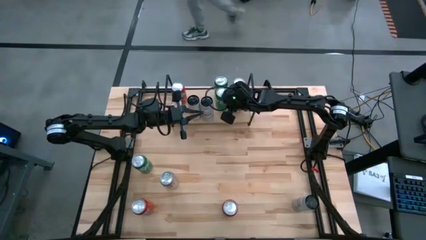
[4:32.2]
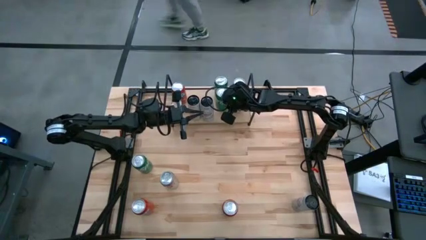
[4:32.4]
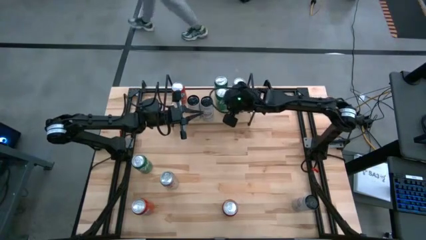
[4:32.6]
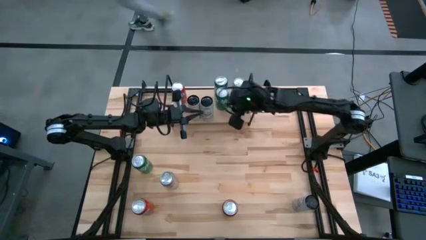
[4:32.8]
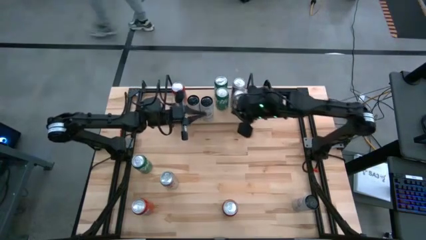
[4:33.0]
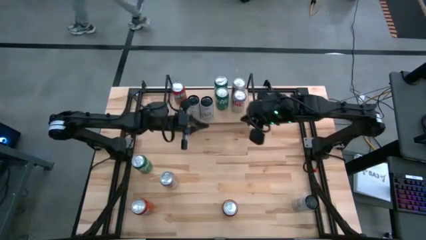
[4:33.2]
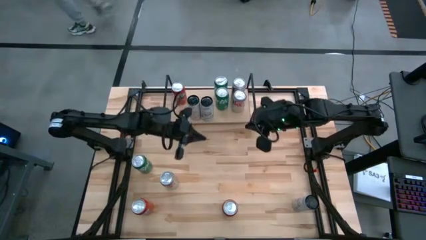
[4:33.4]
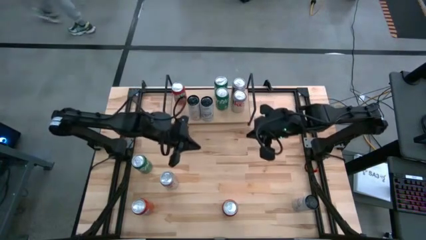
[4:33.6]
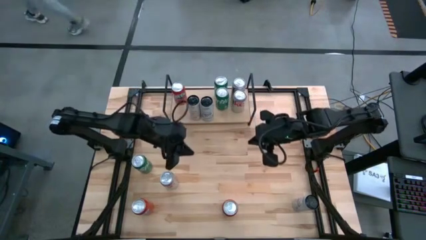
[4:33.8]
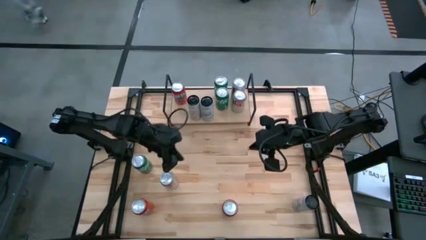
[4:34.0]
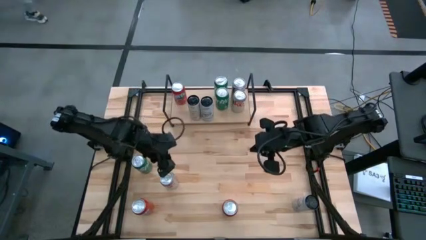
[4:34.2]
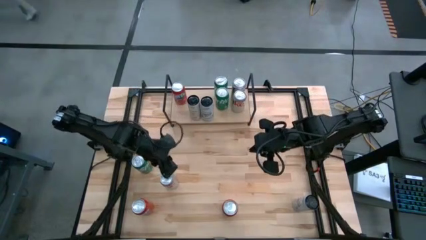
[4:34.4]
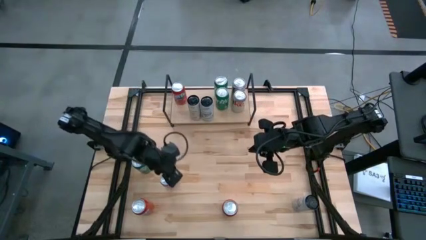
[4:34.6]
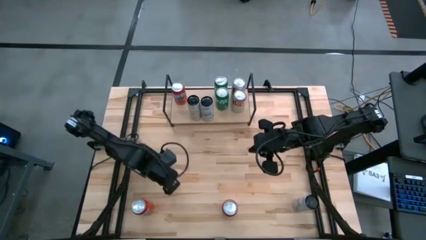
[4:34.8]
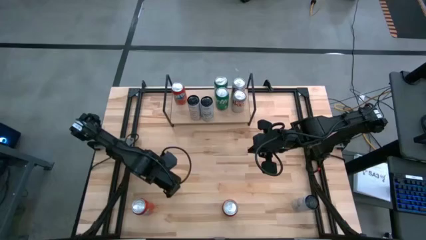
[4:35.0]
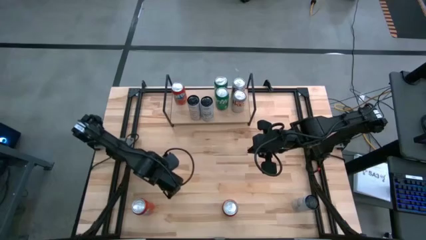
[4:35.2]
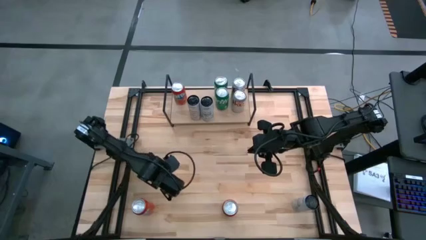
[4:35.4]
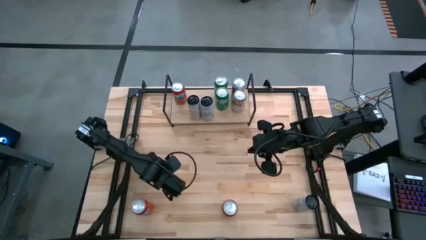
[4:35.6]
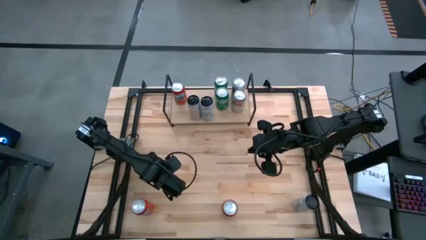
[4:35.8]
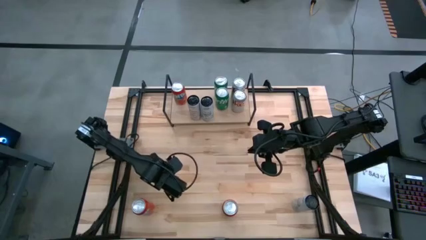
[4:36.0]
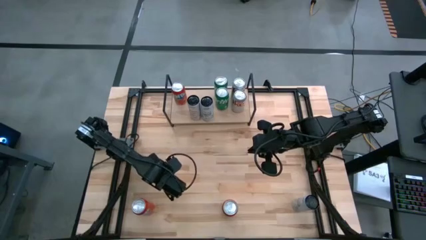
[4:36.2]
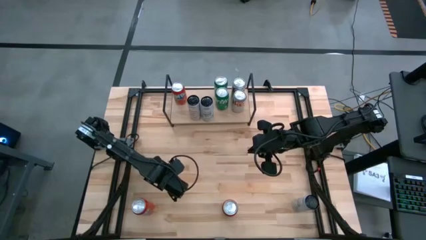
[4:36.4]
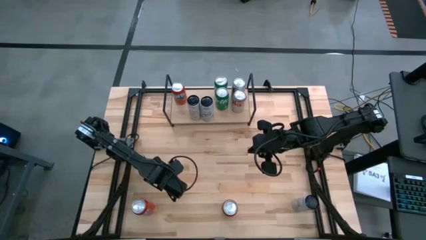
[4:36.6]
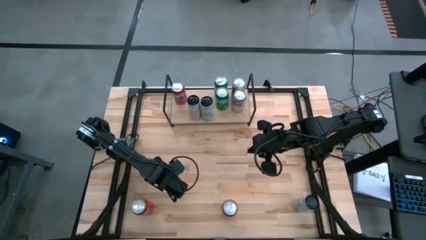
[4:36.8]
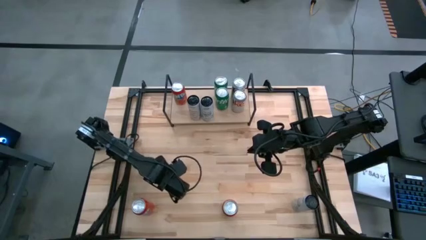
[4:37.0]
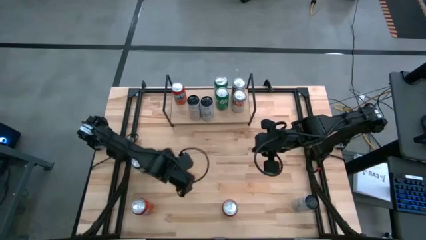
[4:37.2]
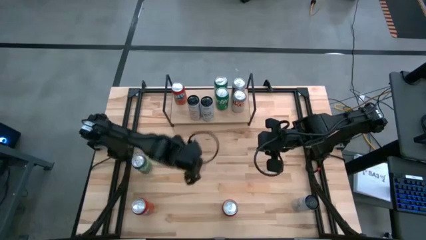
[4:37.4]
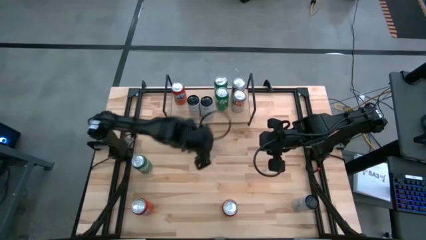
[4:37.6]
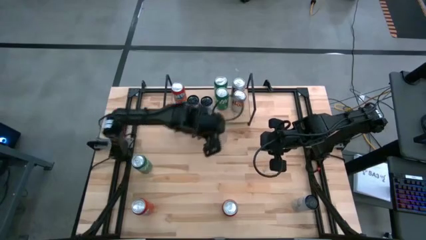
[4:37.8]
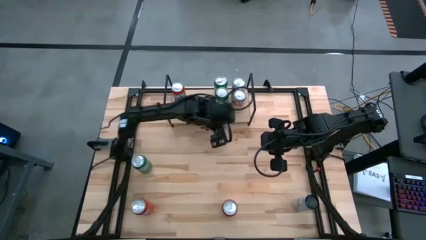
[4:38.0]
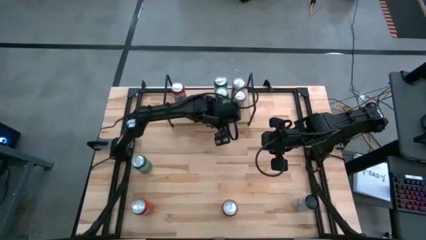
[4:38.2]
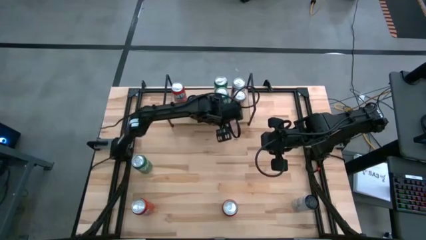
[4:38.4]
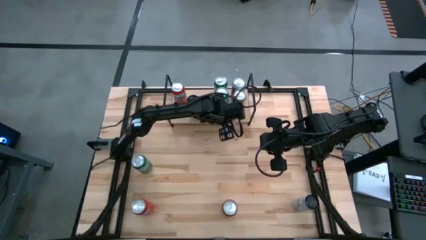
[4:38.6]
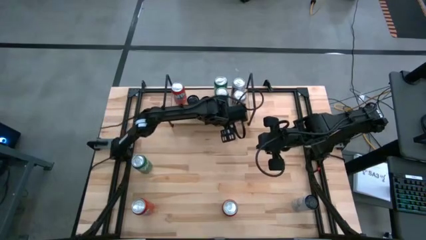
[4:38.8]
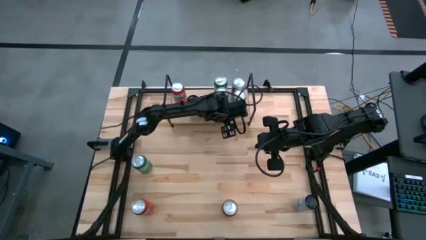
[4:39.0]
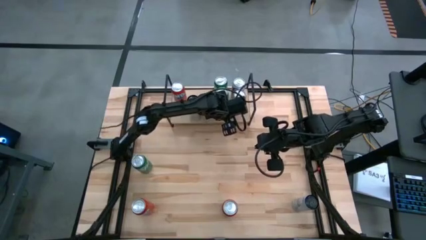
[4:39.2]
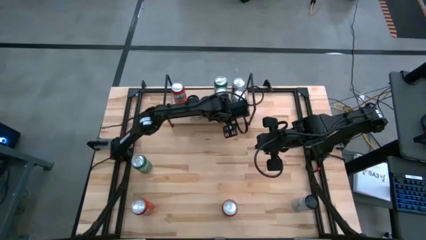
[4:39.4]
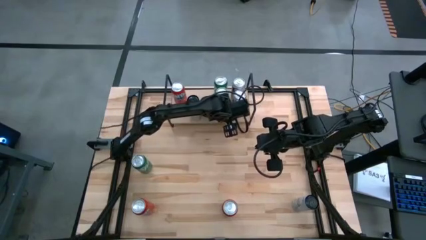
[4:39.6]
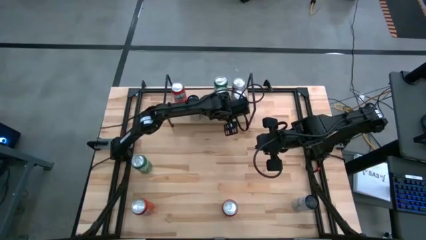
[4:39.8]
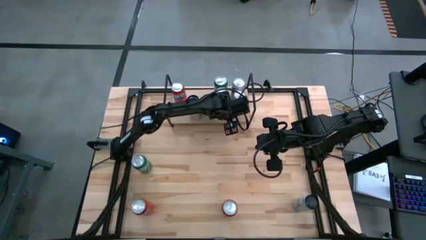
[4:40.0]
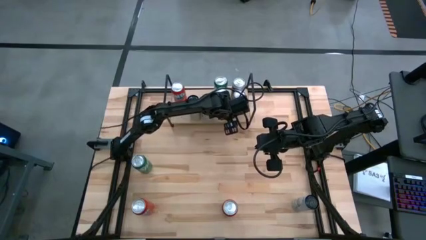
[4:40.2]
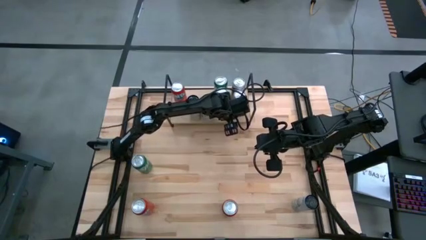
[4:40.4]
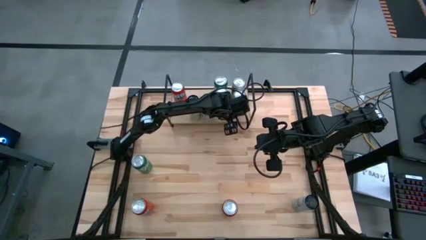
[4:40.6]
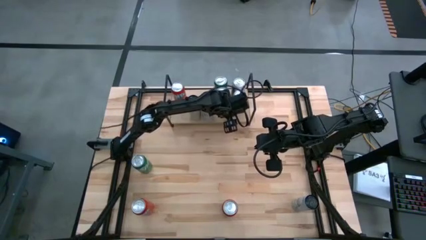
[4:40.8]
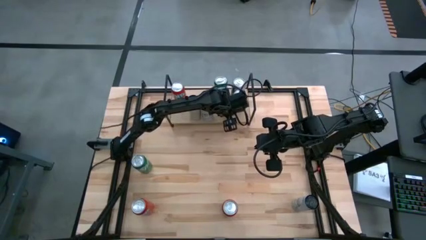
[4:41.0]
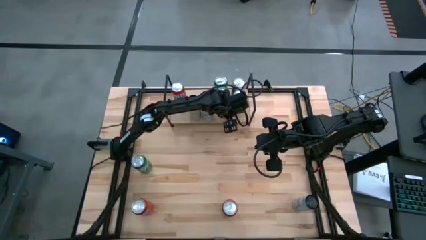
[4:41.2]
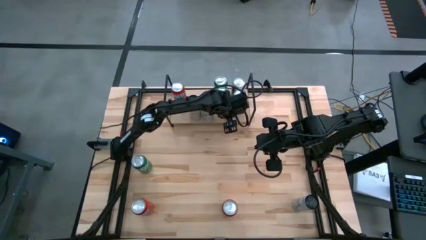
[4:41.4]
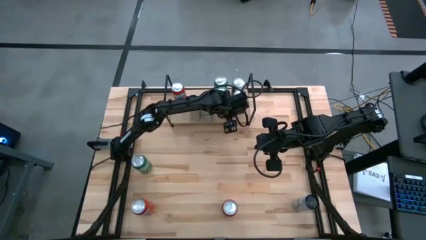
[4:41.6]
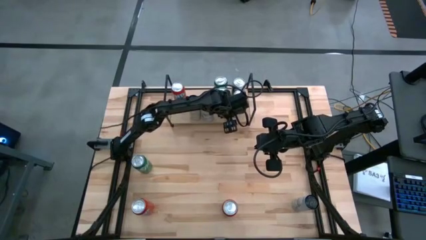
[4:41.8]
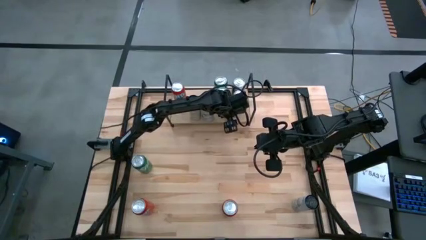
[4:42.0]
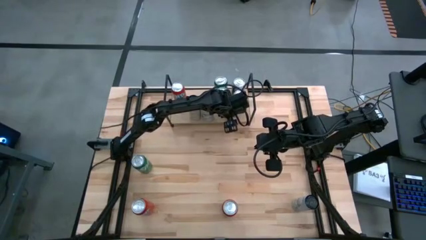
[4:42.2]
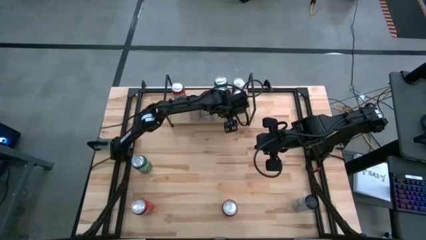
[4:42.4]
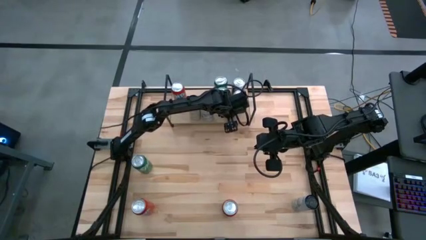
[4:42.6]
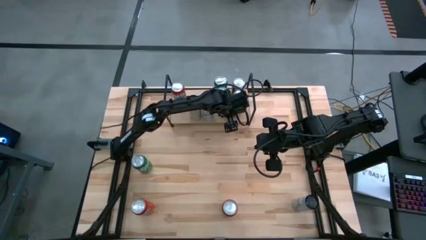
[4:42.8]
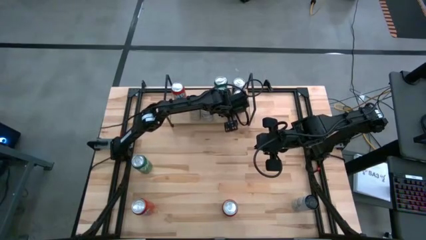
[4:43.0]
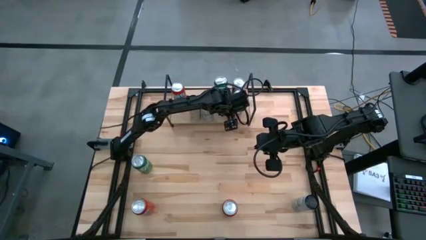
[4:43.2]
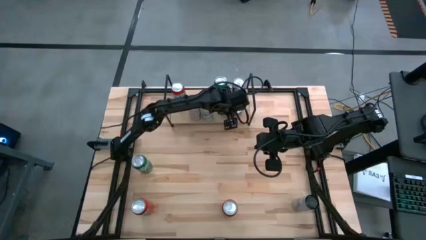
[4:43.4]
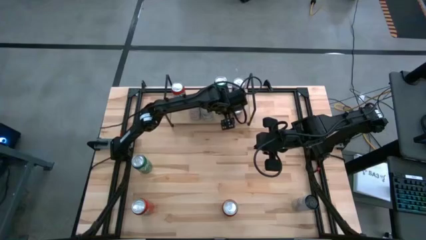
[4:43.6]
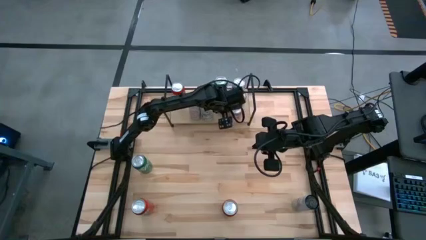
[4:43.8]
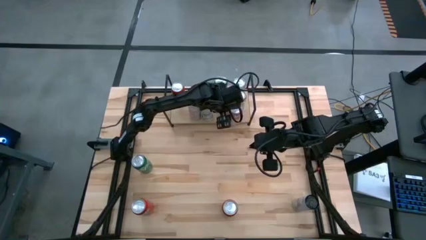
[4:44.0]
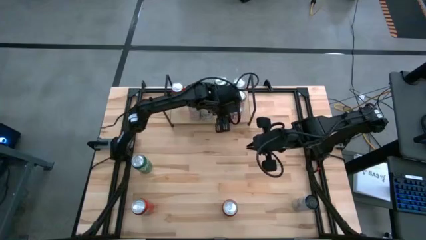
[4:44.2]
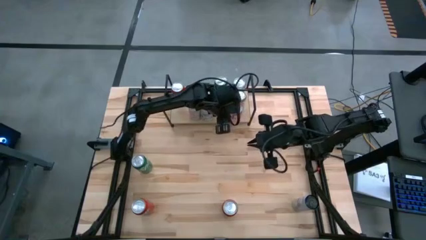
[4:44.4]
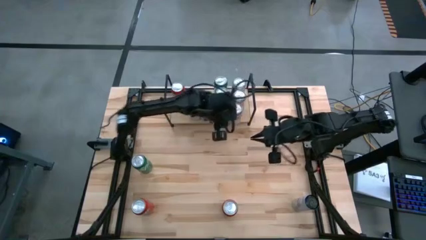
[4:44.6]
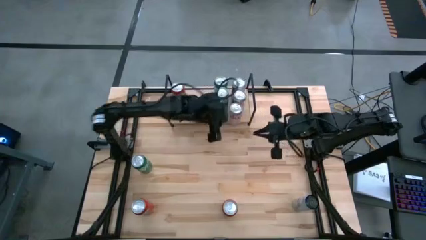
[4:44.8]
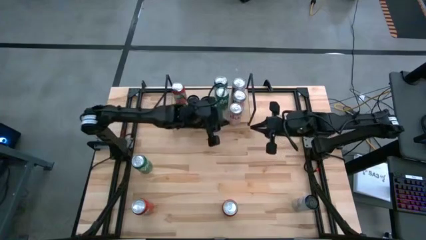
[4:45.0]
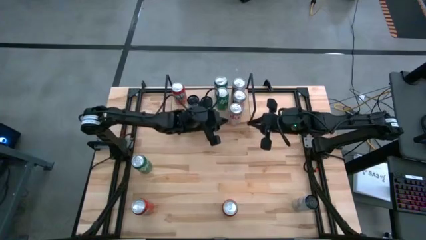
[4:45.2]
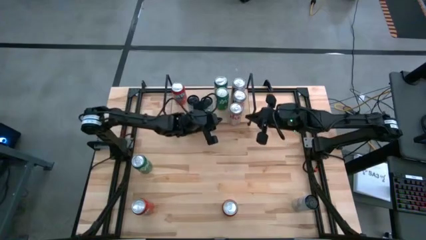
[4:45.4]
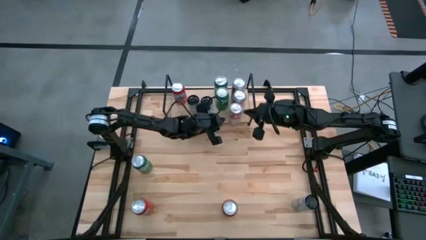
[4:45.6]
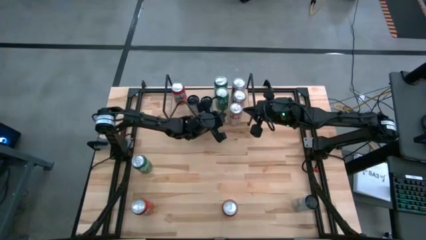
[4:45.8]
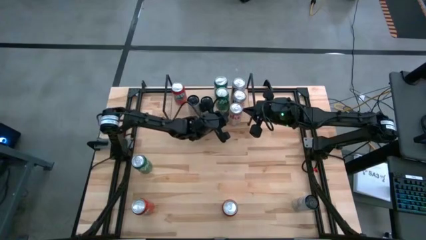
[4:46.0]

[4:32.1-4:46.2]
Task: Sort soda cans
Put the red silver soda can on the shelf and align it with the other red silver soda cans
